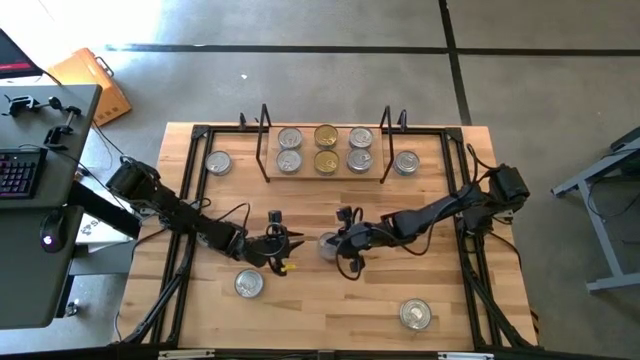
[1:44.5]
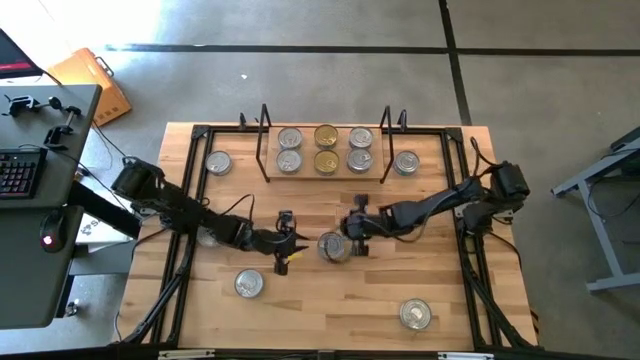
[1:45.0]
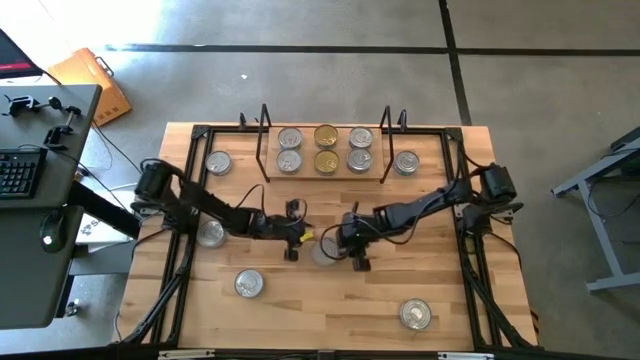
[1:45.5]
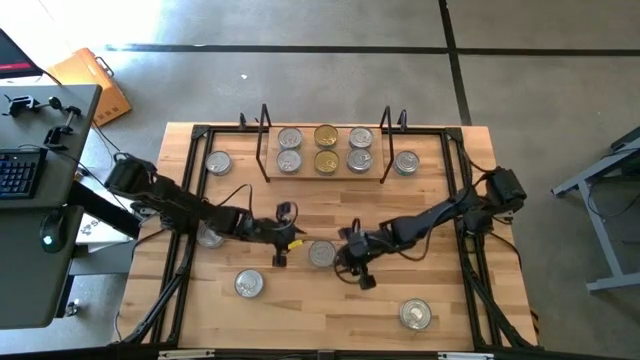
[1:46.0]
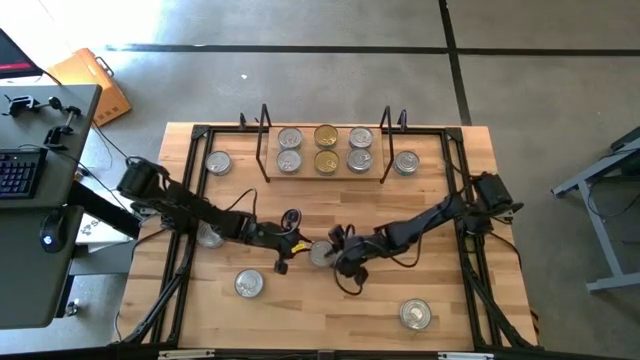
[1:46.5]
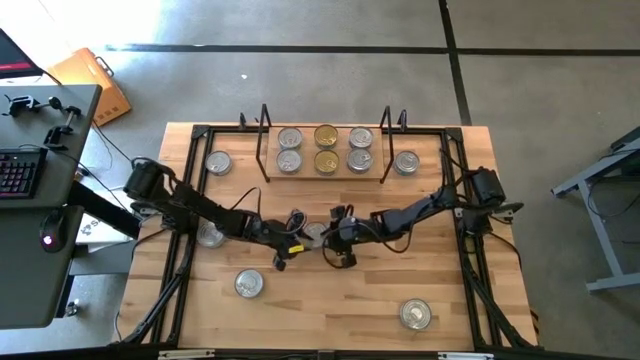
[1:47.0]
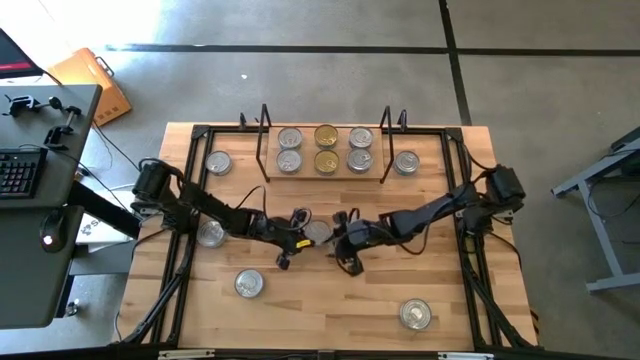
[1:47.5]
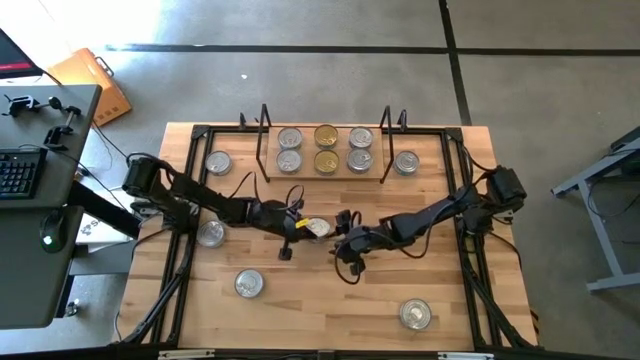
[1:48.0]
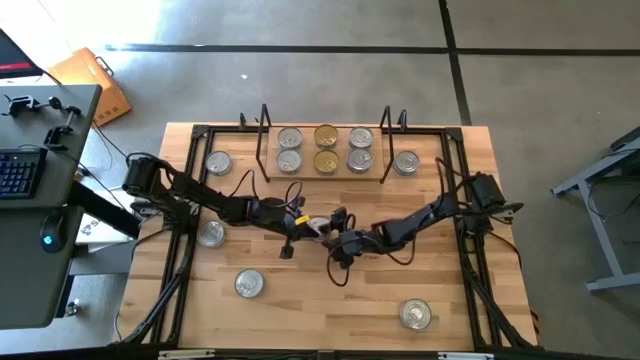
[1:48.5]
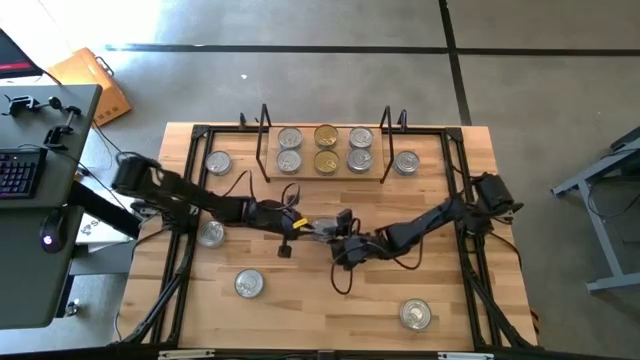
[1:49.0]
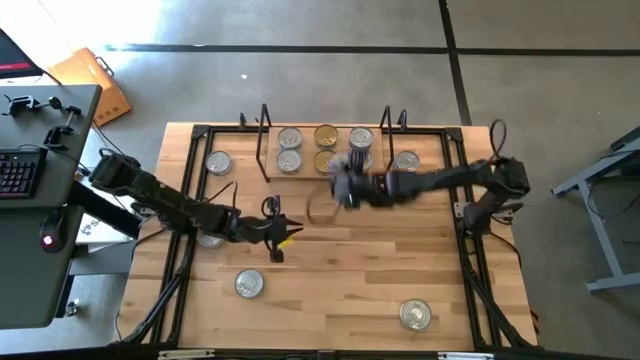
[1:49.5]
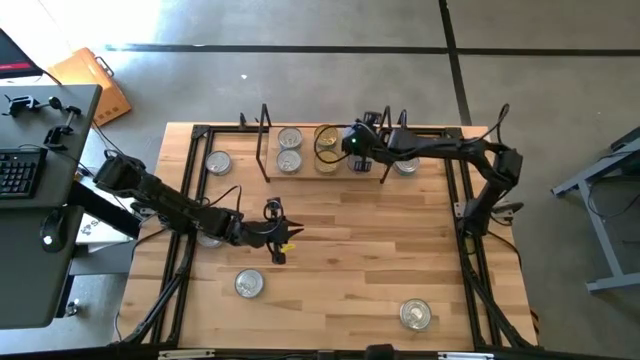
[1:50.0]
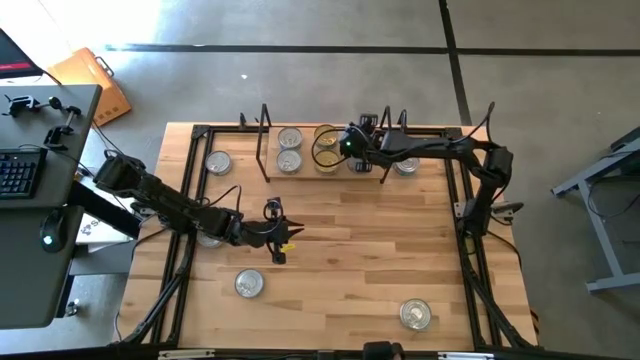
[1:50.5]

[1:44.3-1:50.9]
Task: Stack canned seafood by type on shelf
Stack the blue tuna can on top of the blue tuna can on the shelf

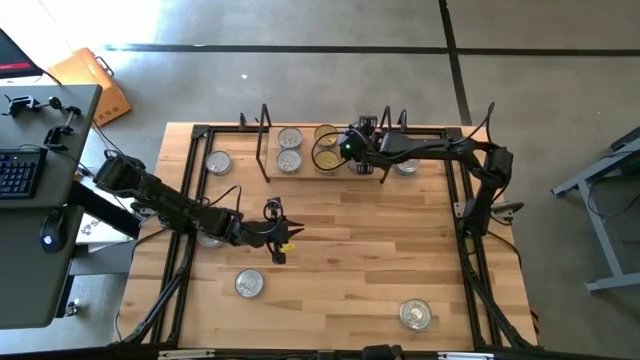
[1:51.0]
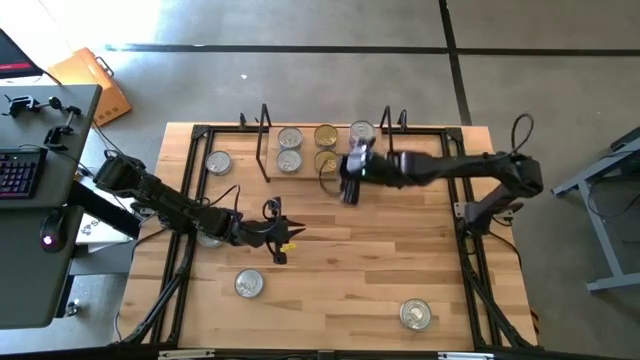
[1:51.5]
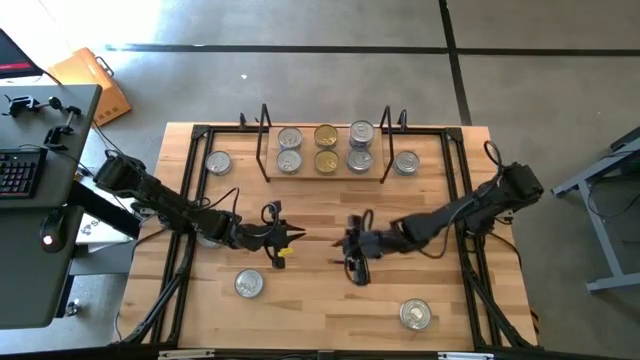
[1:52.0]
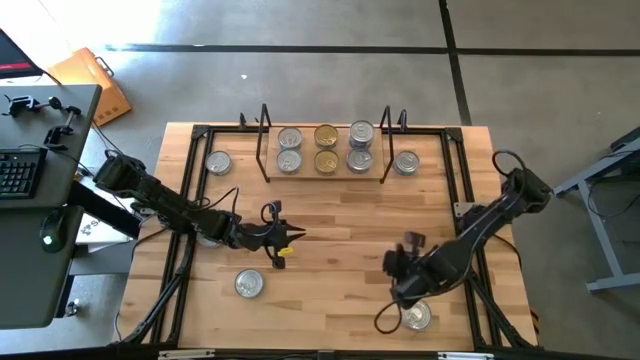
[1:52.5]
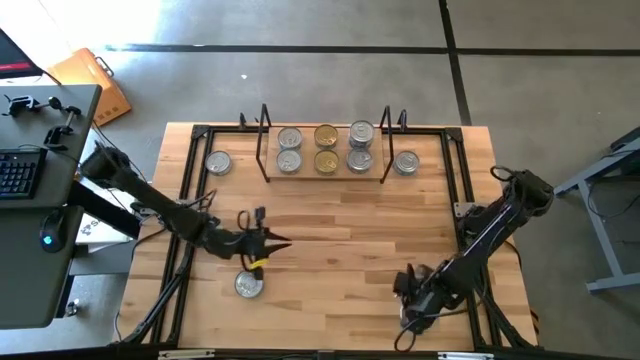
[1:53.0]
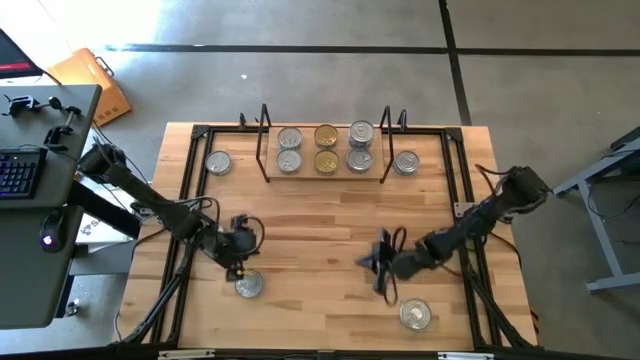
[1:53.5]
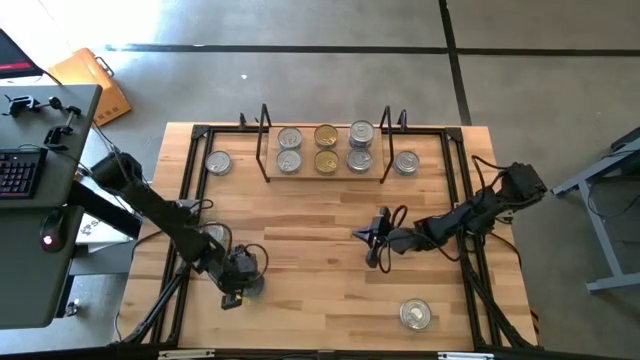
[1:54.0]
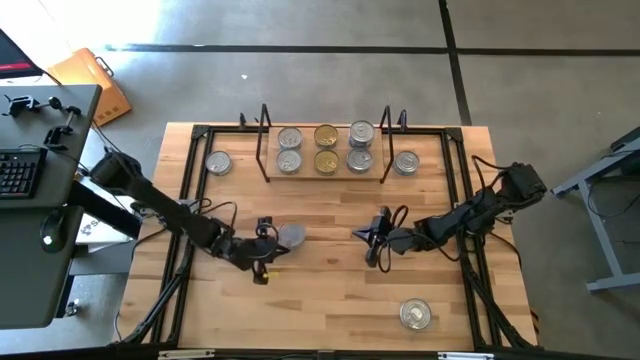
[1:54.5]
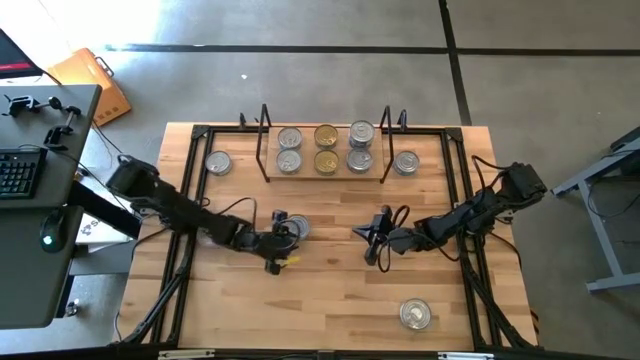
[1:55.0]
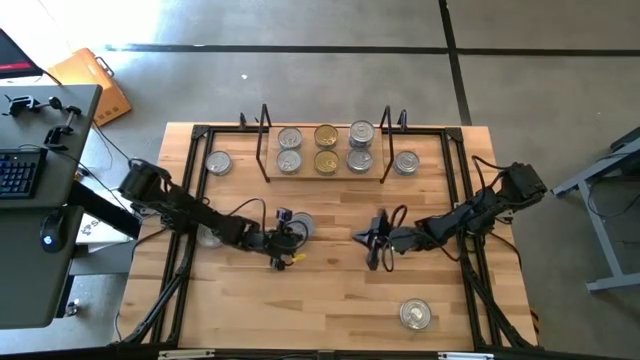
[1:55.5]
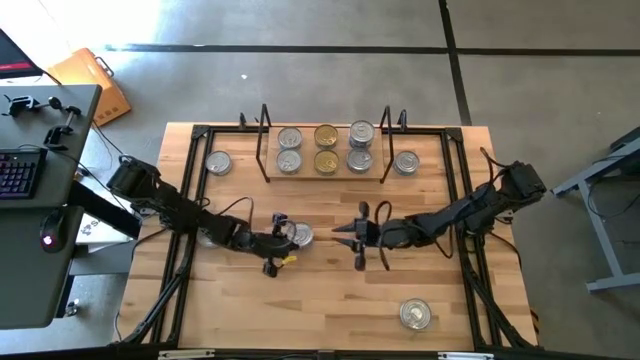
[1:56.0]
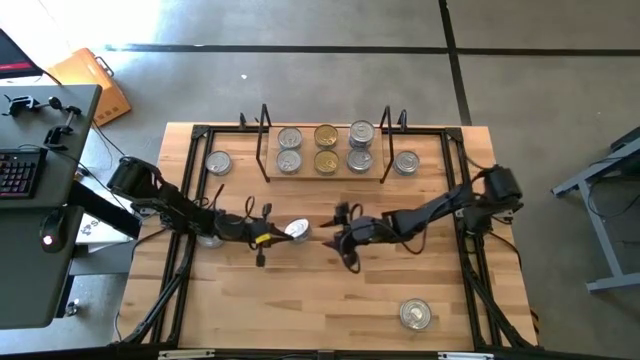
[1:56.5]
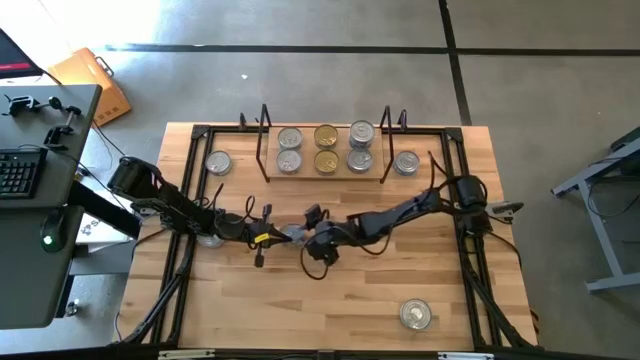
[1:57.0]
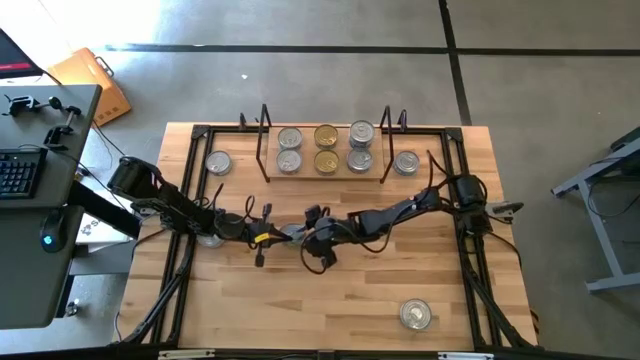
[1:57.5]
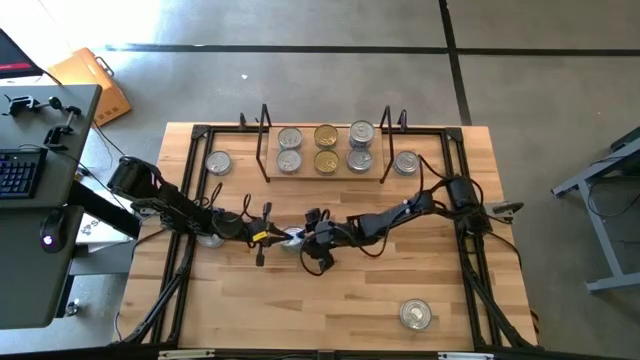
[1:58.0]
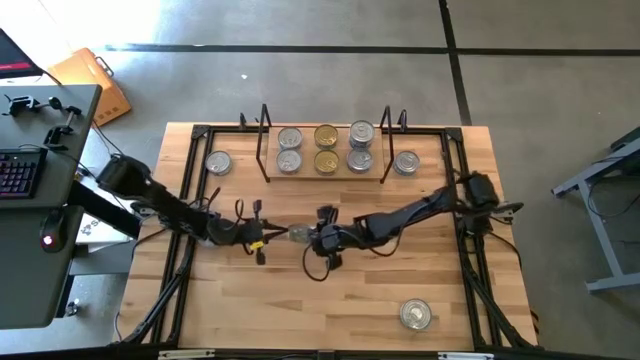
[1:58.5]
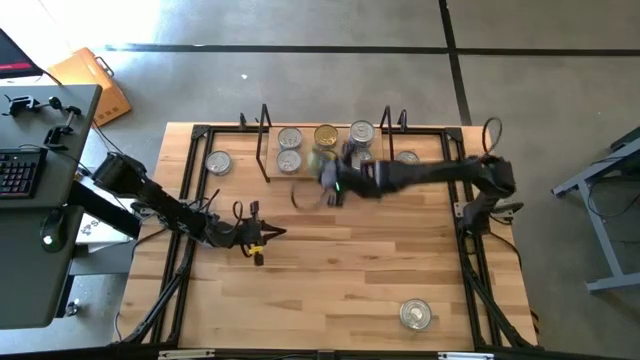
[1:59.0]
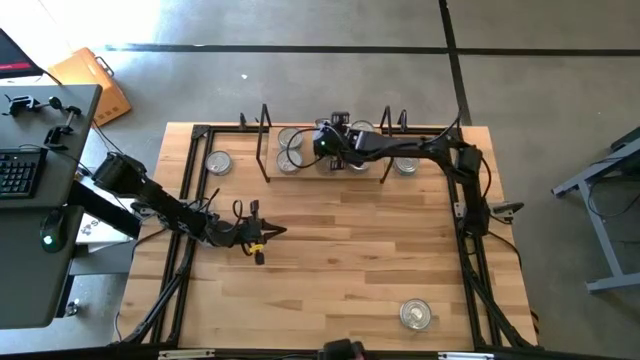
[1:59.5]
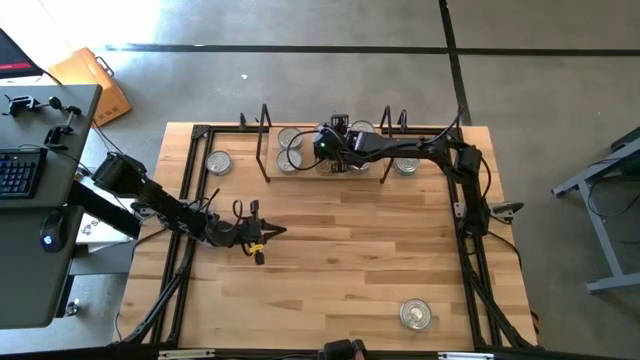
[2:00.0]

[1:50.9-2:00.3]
Stack the green tuna can on top of the green tuna can on the shelf

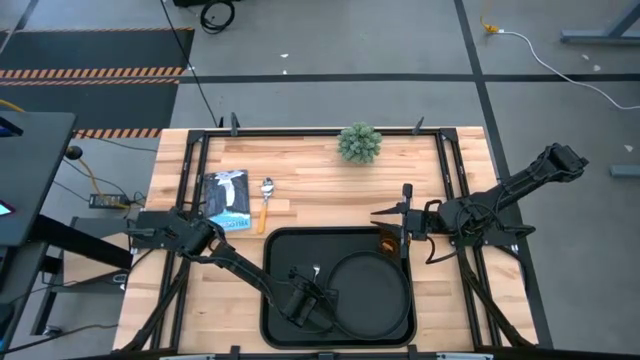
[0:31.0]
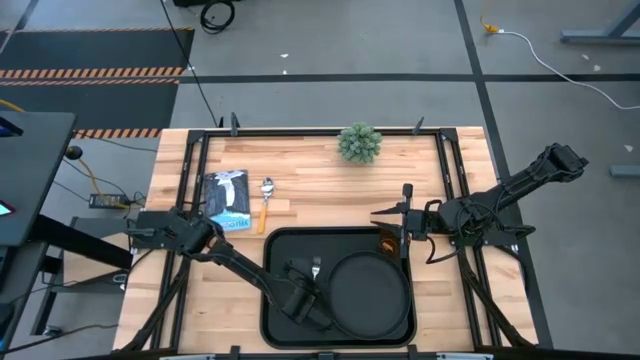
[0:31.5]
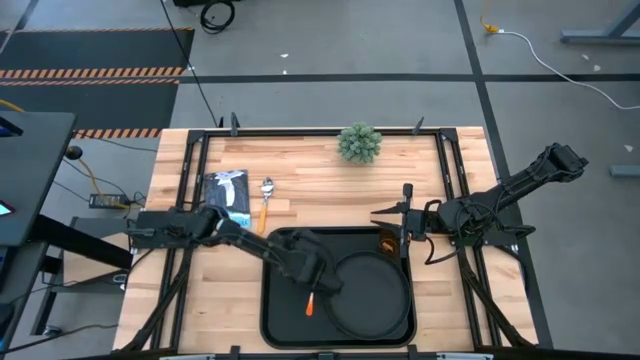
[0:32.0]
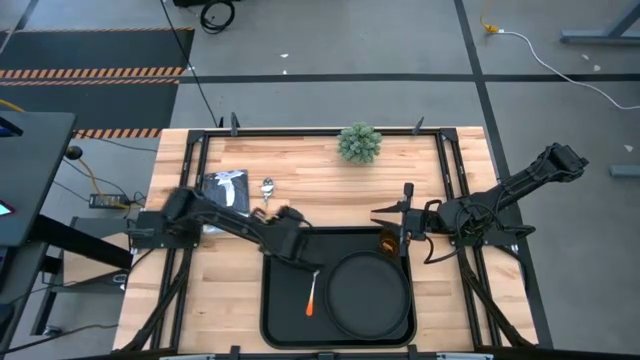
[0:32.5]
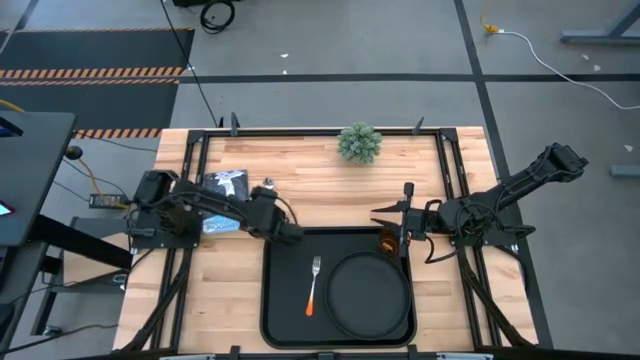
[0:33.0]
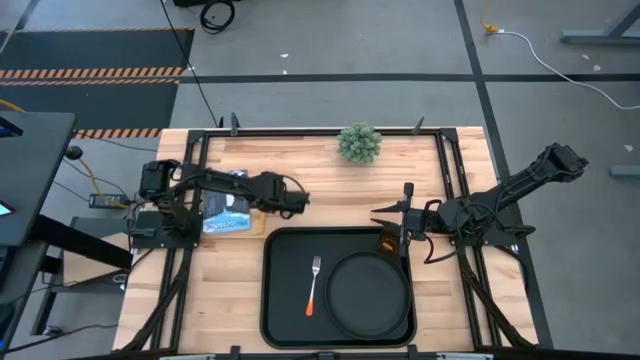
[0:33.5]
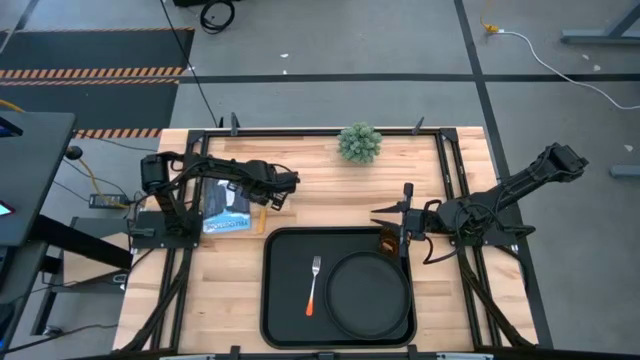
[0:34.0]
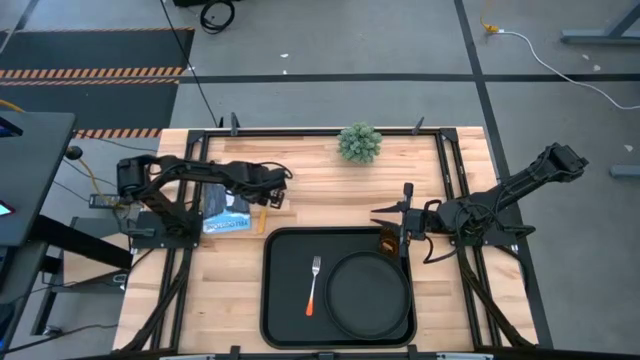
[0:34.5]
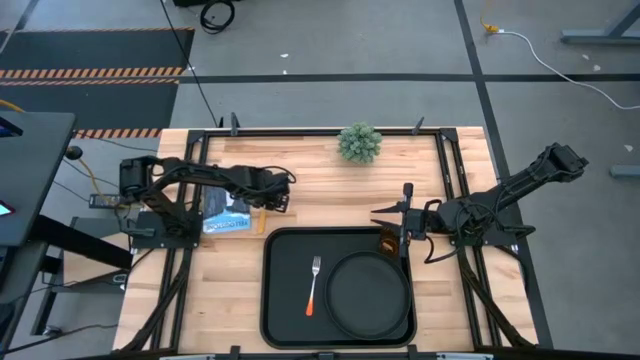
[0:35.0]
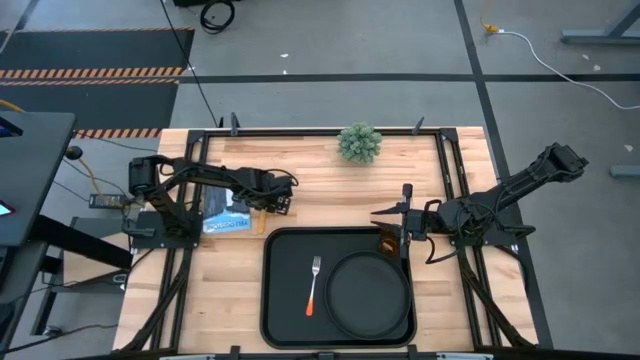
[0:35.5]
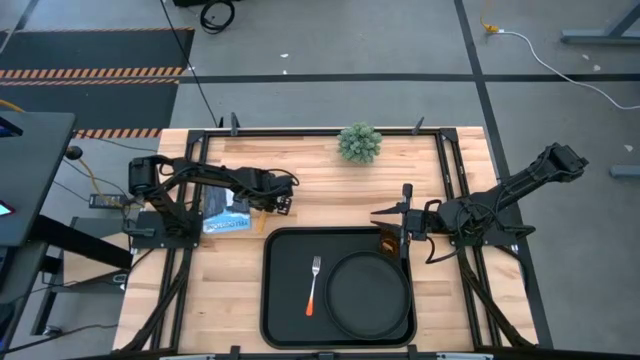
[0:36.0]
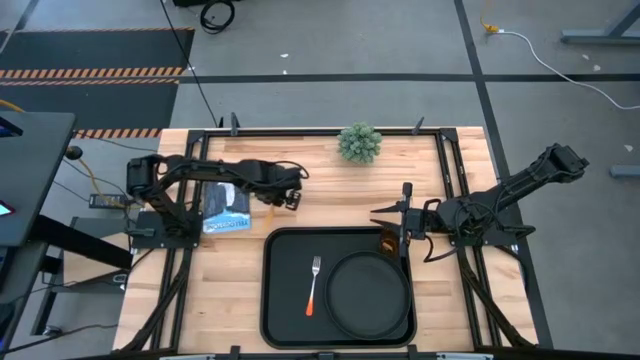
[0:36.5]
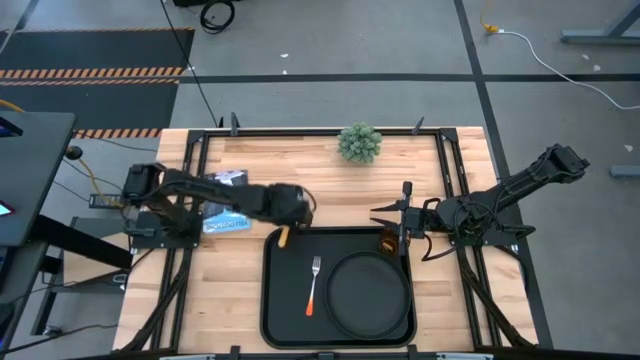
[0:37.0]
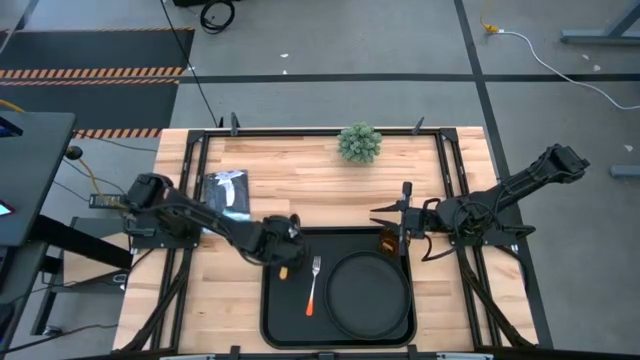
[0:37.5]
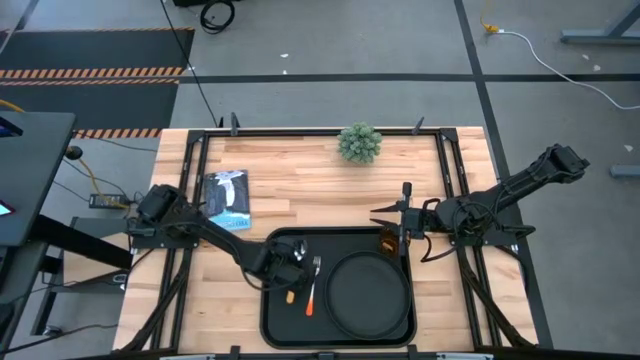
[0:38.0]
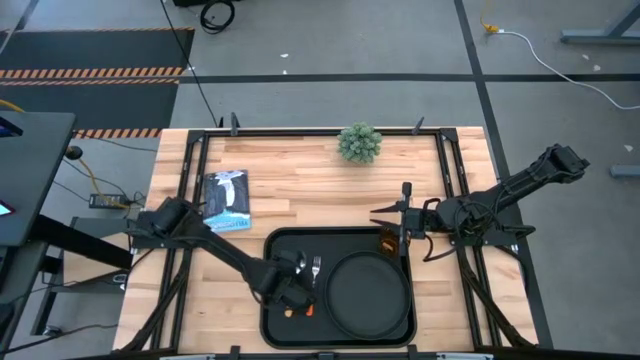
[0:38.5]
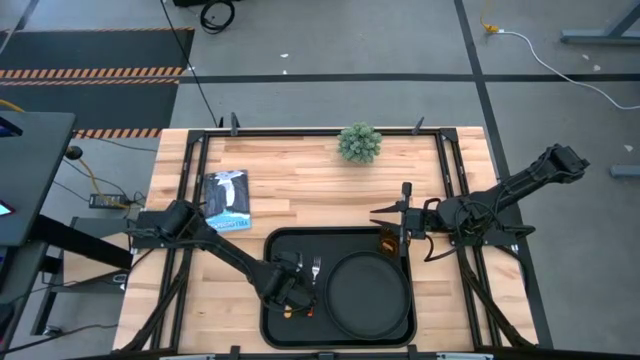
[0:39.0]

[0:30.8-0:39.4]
Task: Pick and place plate/cup/fork/spoon on tray
Put the yellow spoon on the black tray to the left of the orange fork
